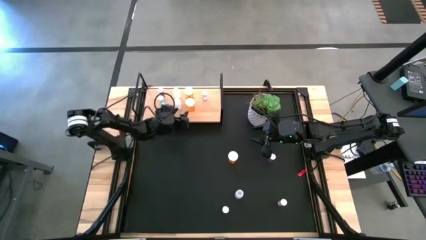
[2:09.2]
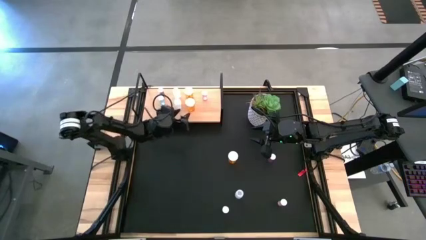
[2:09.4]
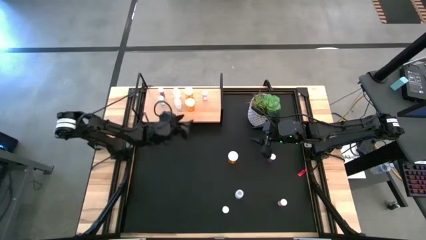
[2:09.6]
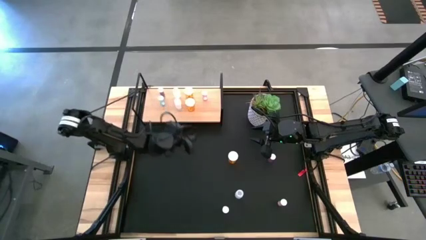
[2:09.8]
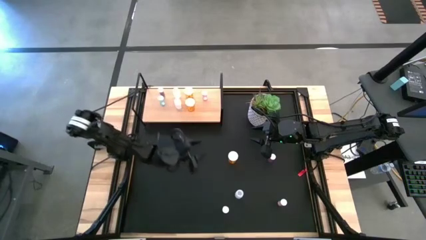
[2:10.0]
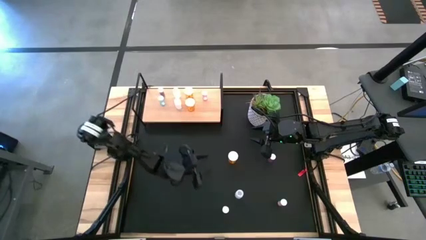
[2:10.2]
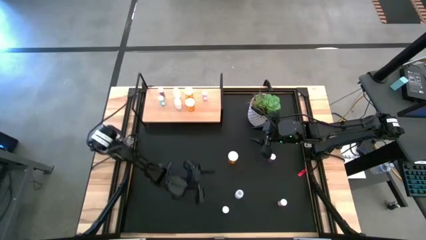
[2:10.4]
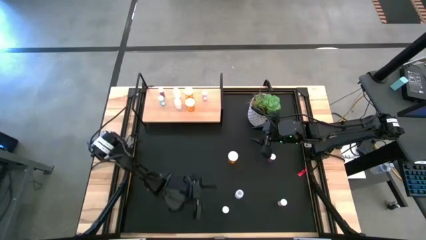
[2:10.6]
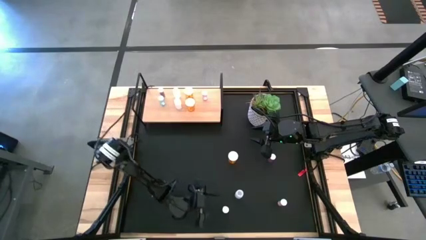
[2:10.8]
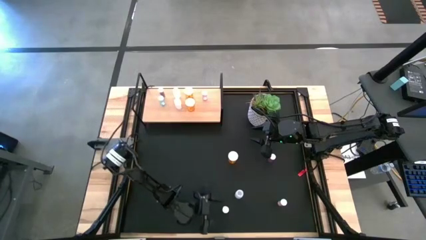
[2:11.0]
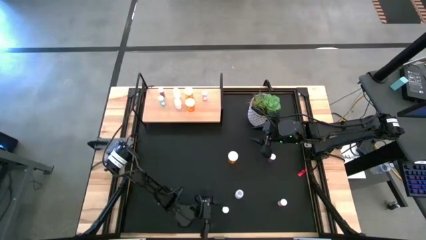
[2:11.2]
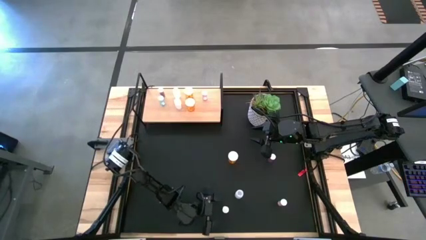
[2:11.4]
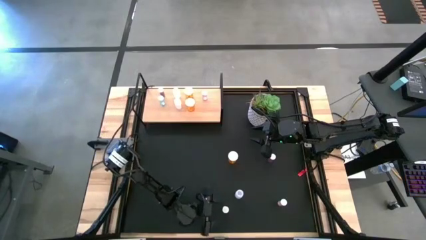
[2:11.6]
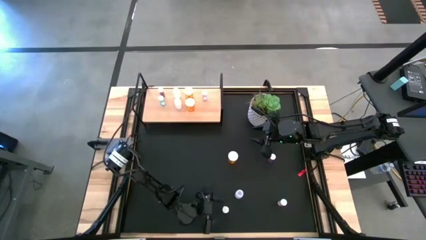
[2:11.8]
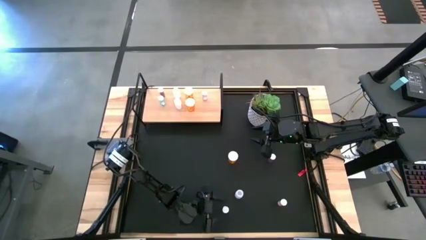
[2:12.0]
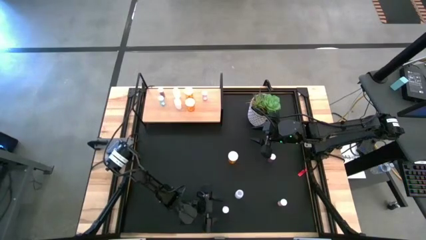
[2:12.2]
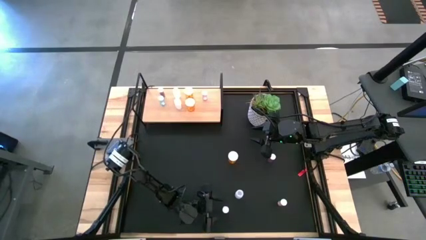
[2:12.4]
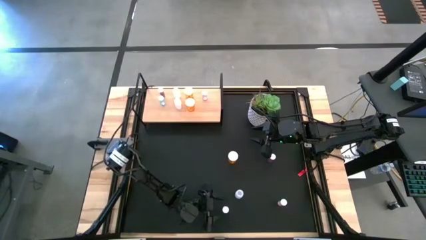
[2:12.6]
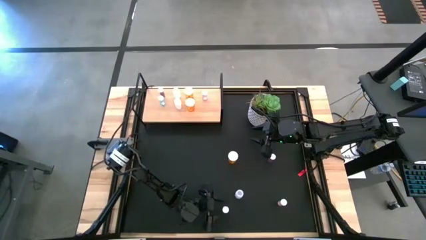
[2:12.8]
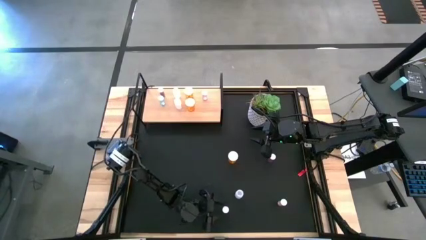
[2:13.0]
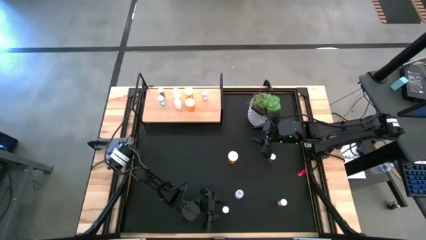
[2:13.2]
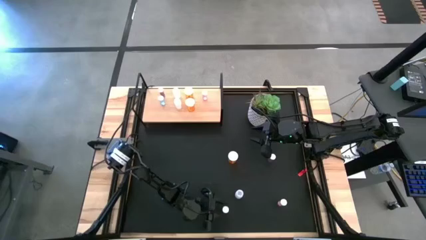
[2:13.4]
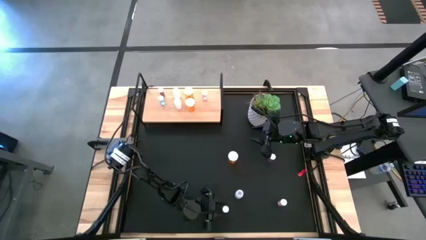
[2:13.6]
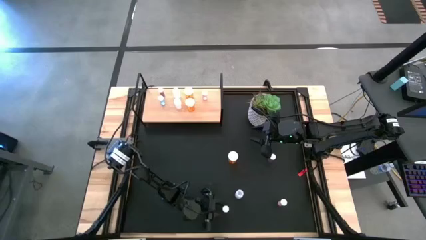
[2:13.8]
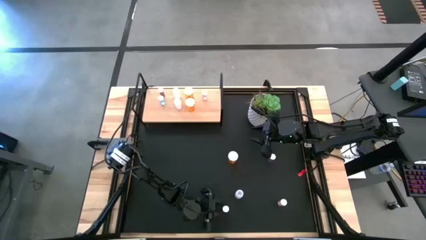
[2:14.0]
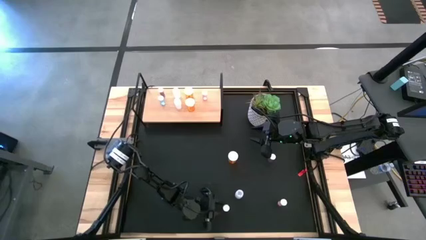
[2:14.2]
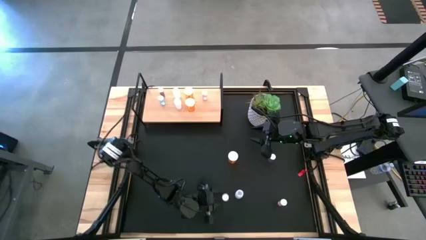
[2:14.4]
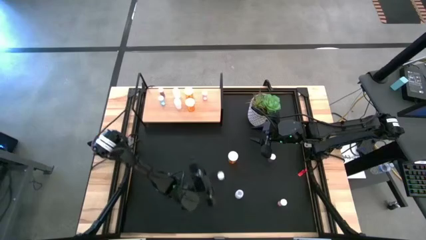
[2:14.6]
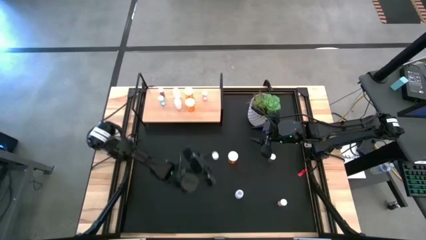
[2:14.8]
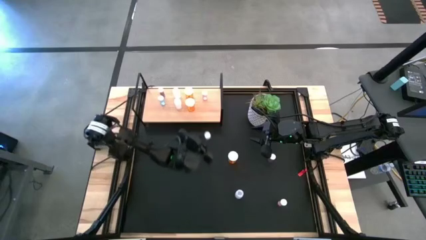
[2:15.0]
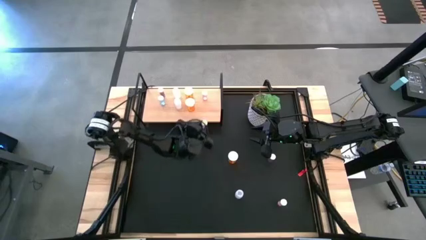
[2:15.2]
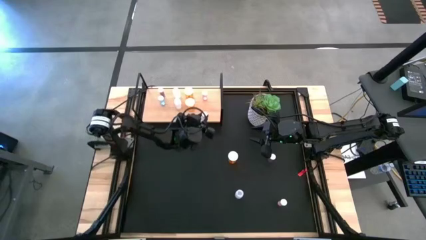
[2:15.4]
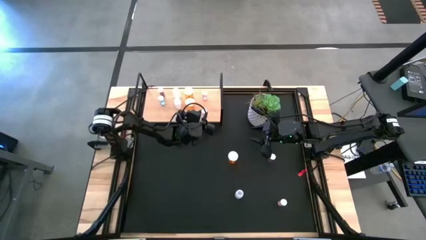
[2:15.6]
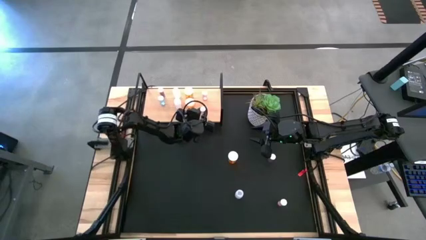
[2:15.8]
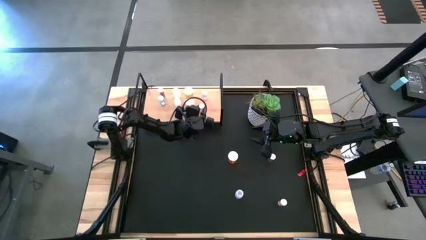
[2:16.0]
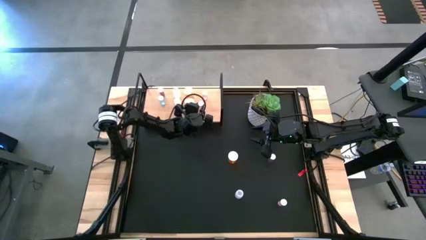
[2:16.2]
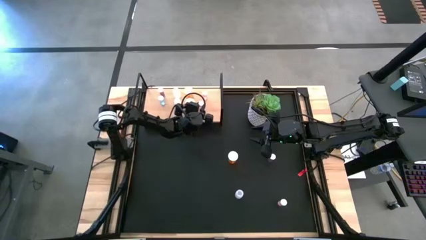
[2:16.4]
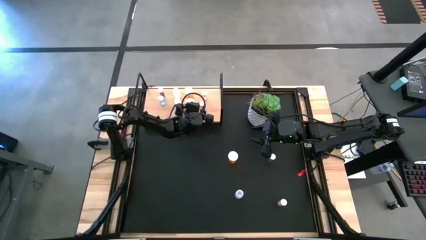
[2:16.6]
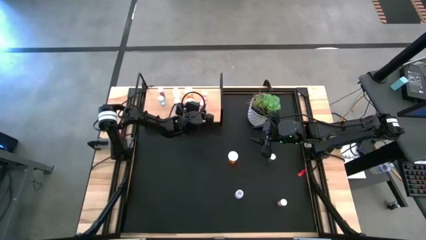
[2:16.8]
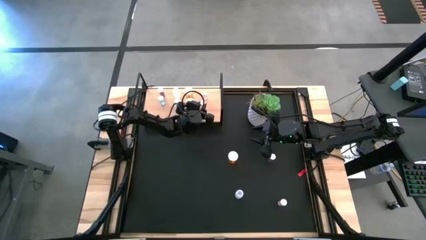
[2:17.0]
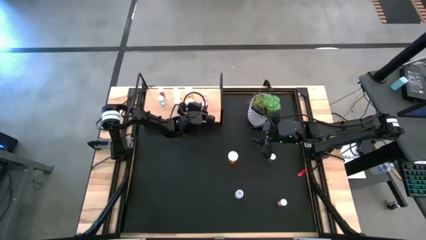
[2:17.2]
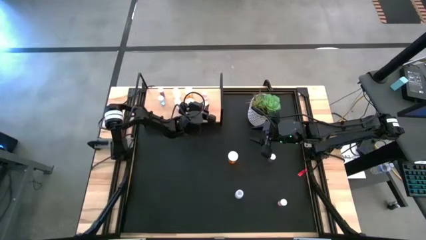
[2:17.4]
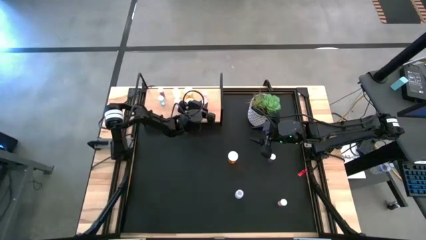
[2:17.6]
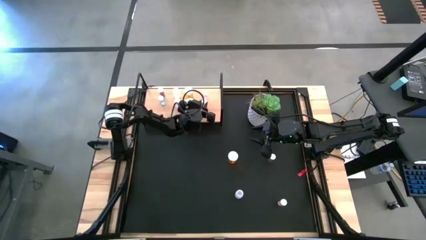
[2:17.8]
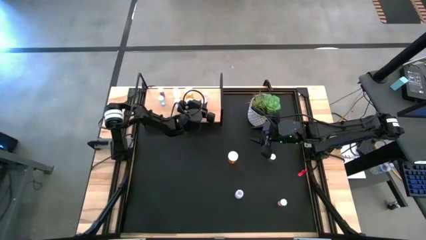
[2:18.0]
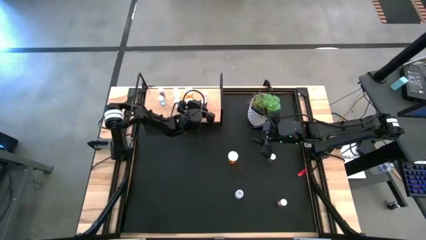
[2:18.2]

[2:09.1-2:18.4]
Task: Pick and place medicine bottles onto shelf by color
Put the bottom left pink pill bottle on the shelf aligned with the other pink pill bottle

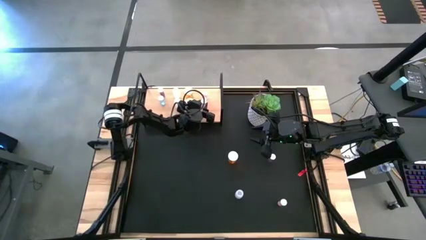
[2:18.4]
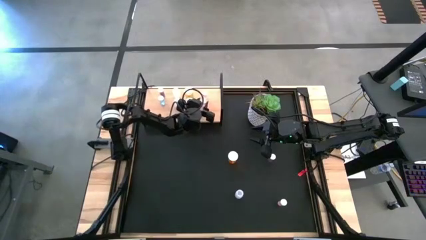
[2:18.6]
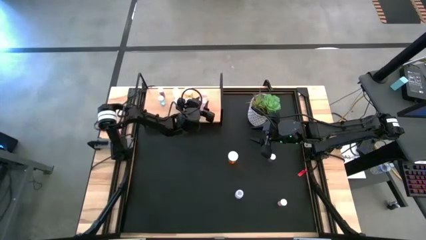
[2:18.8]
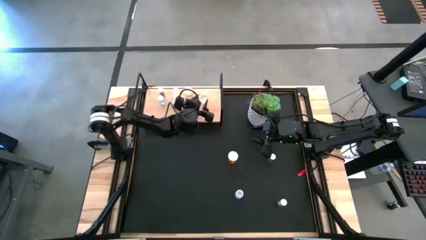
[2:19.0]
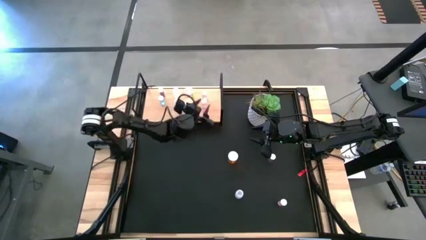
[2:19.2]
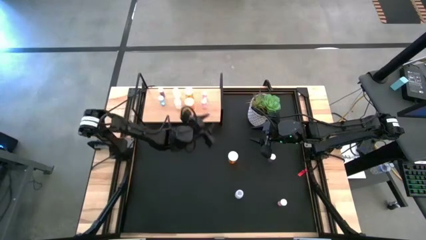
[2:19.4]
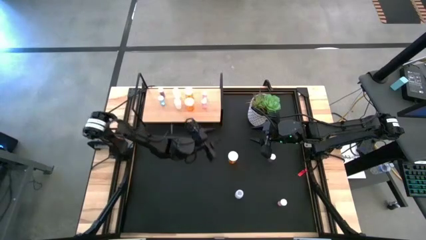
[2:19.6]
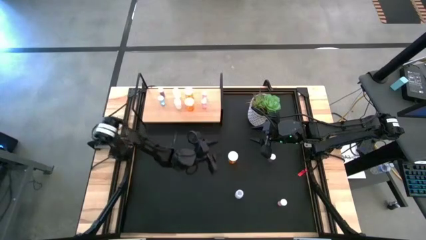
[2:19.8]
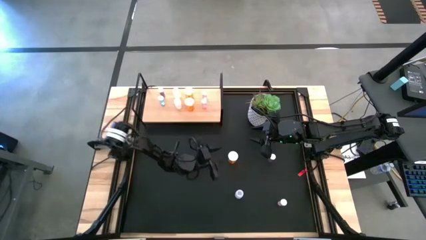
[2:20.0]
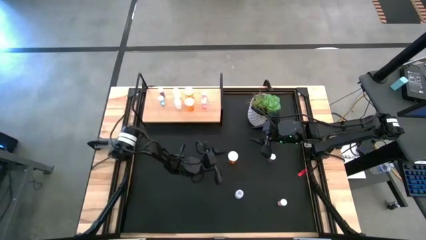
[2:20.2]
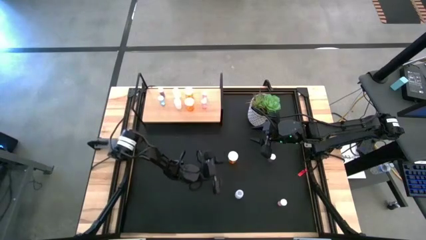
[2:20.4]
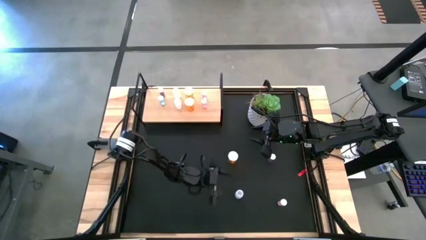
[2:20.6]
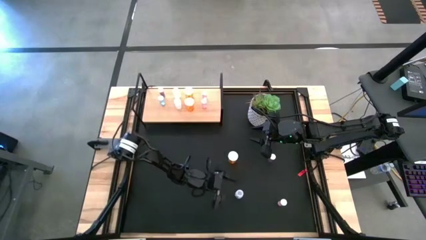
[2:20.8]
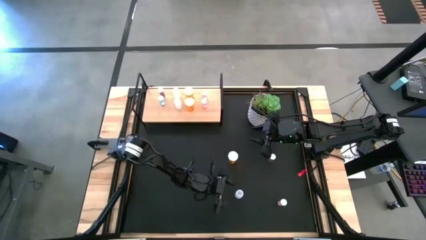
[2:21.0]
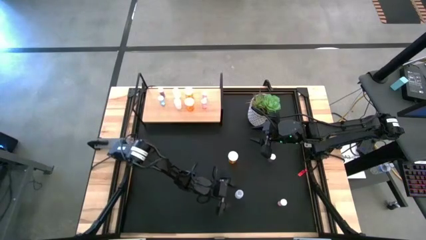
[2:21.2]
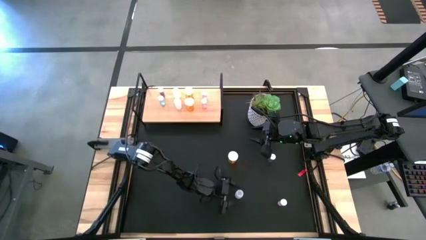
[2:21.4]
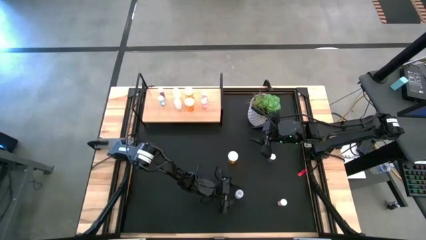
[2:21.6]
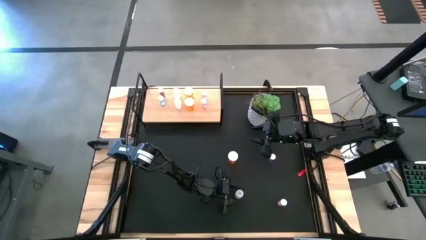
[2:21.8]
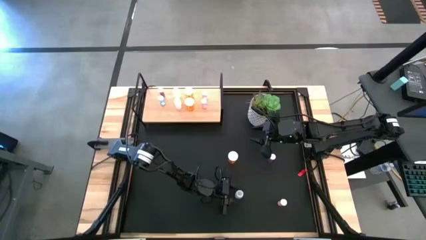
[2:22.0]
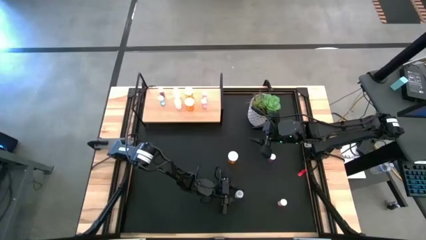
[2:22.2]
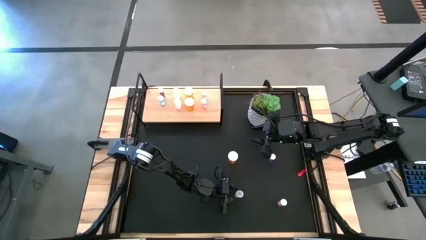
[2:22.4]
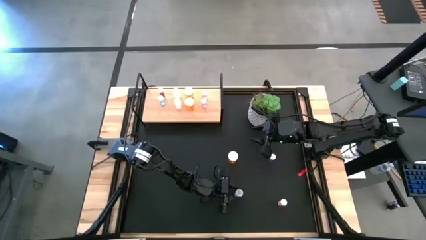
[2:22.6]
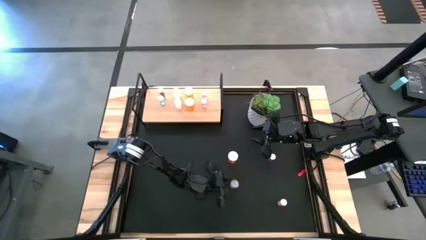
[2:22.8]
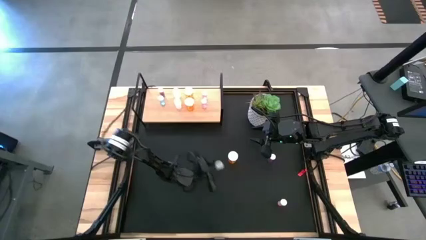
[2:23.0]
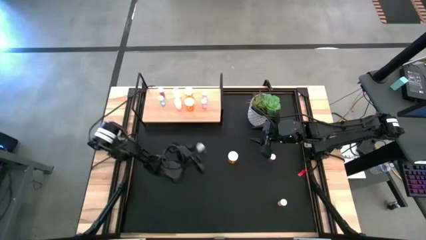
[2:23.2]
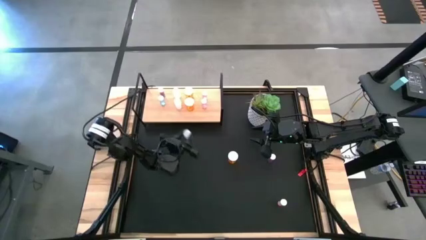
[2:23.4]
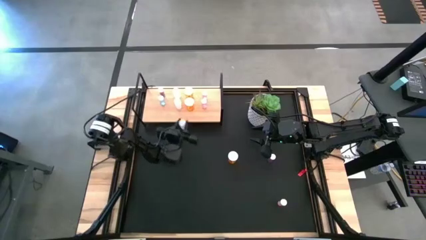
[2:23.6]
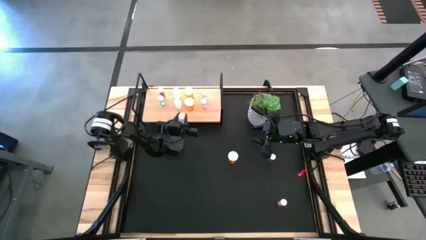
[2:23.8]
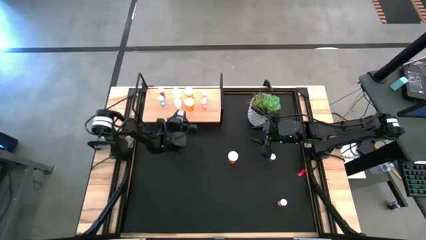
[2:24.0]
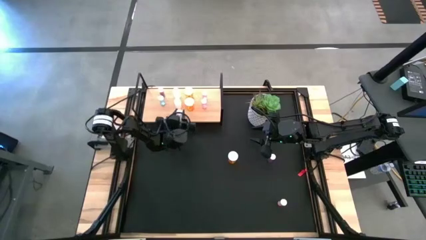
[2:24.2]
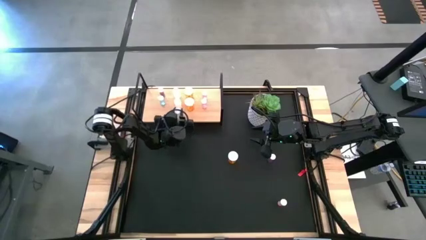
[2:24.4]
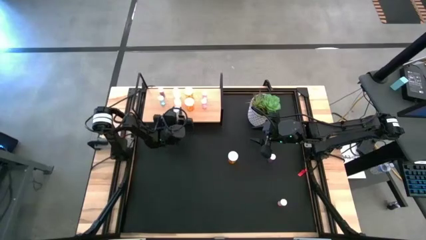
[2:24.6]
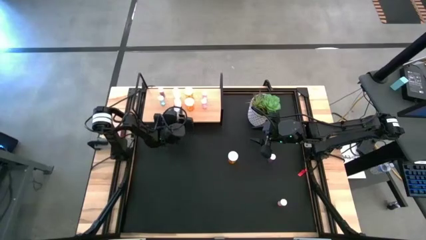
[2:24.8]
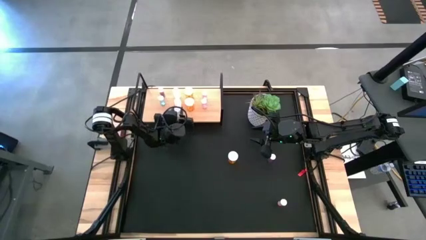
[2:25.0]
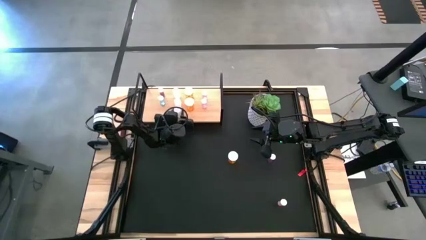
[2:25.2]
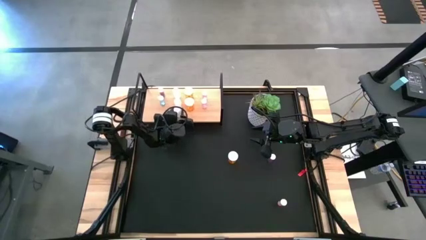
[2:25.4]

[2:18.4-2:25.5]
Put the white pill bottle on the shelf aligned with the other white pill bottles
